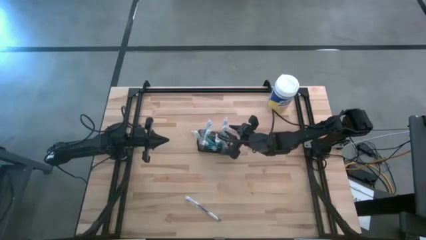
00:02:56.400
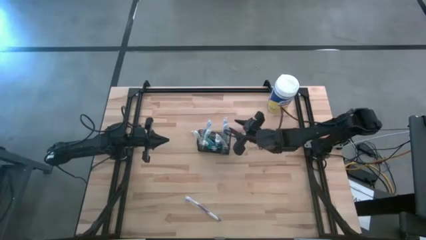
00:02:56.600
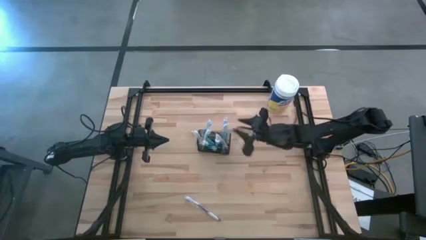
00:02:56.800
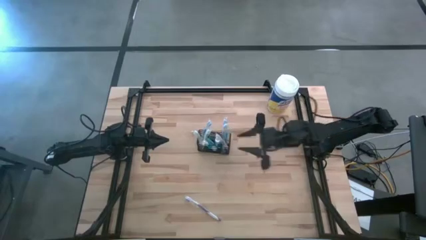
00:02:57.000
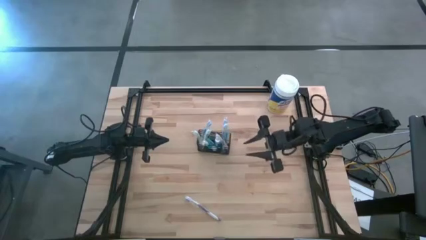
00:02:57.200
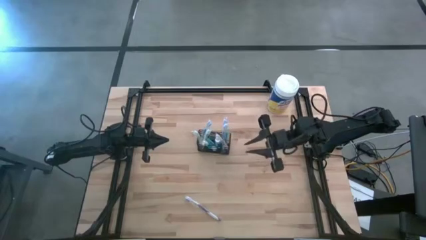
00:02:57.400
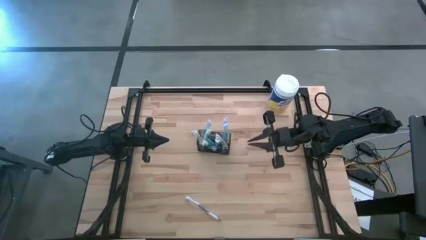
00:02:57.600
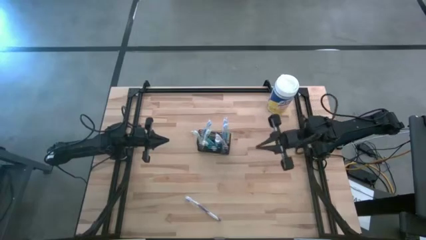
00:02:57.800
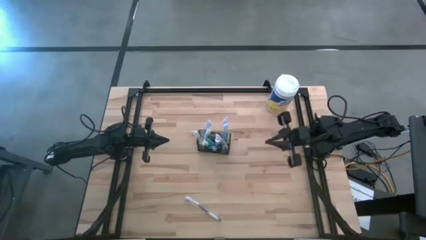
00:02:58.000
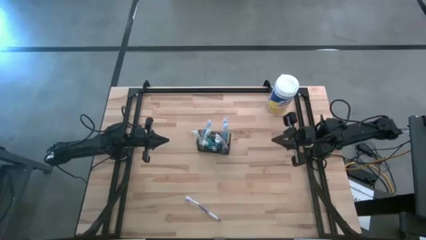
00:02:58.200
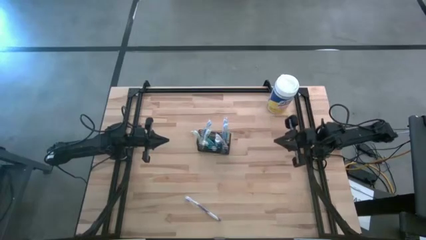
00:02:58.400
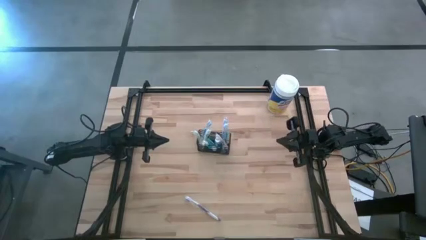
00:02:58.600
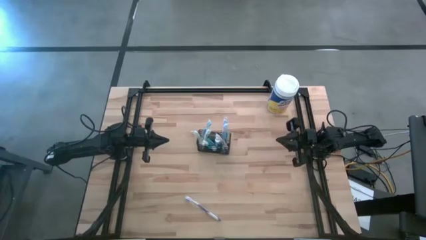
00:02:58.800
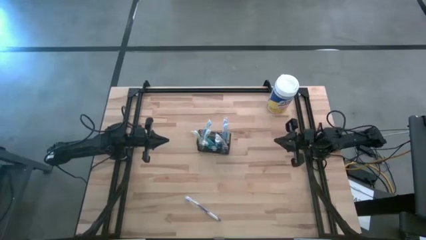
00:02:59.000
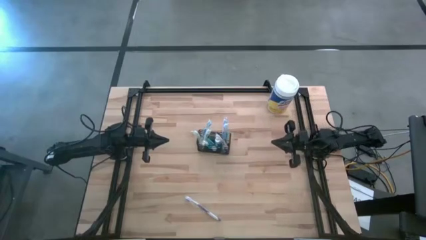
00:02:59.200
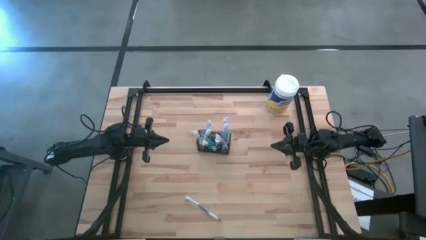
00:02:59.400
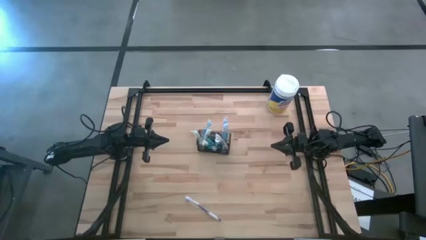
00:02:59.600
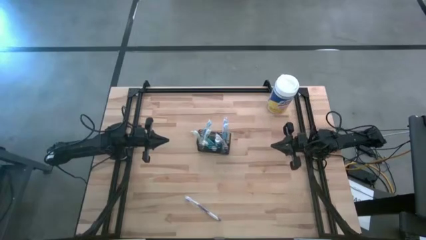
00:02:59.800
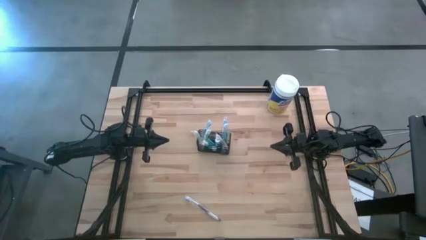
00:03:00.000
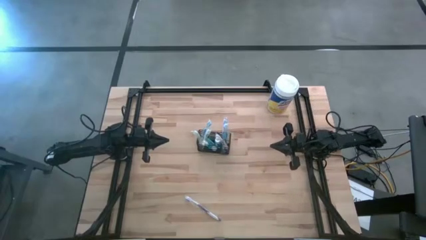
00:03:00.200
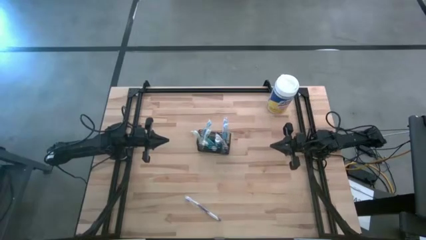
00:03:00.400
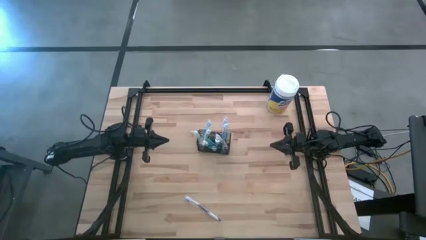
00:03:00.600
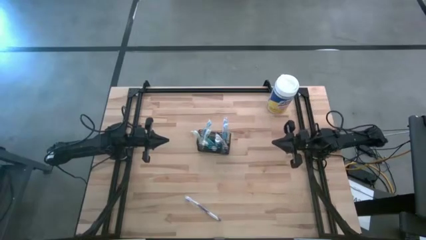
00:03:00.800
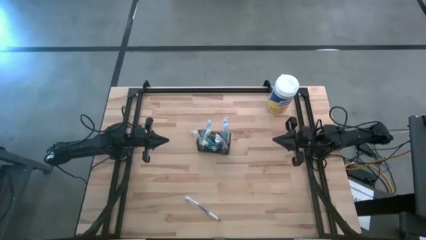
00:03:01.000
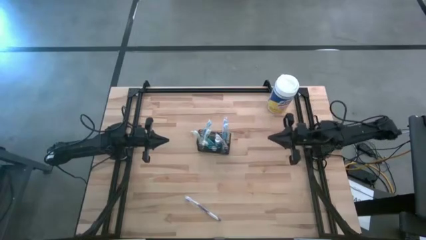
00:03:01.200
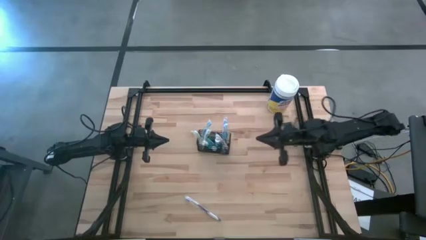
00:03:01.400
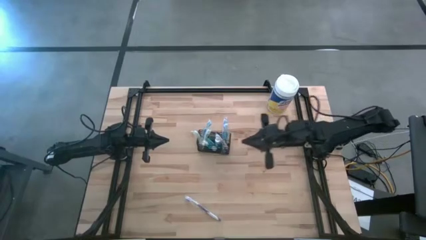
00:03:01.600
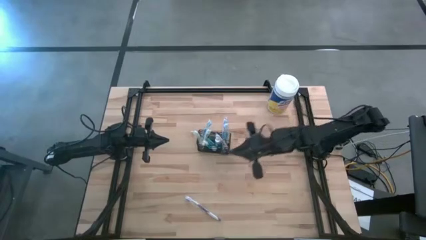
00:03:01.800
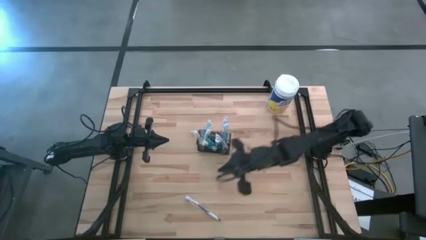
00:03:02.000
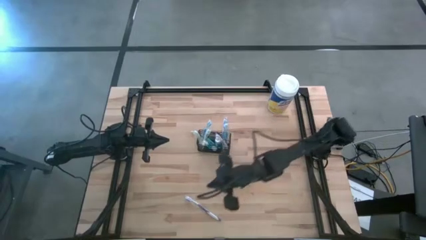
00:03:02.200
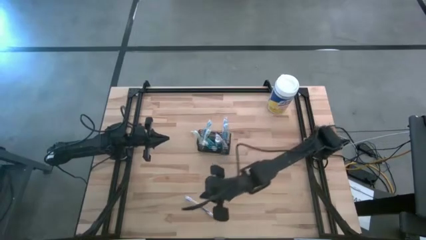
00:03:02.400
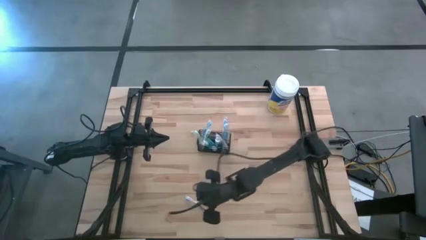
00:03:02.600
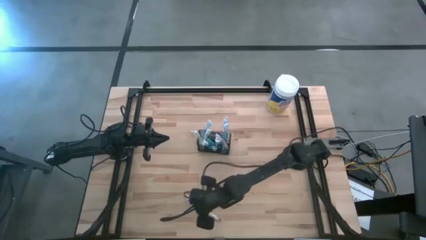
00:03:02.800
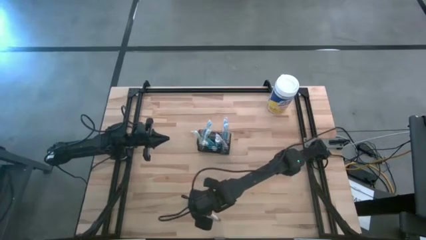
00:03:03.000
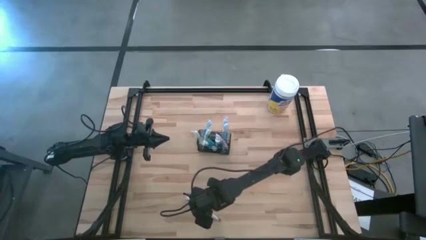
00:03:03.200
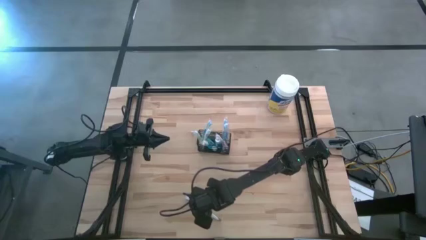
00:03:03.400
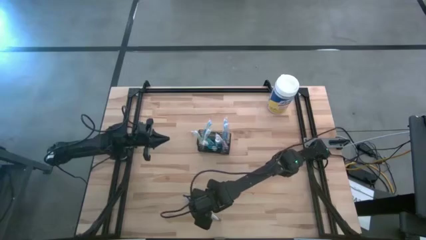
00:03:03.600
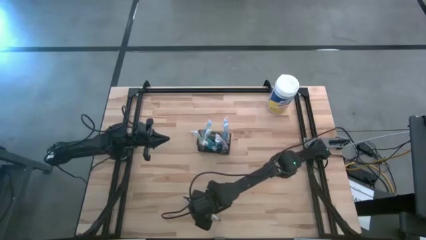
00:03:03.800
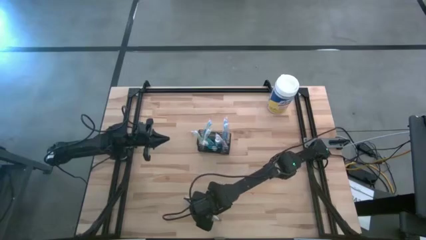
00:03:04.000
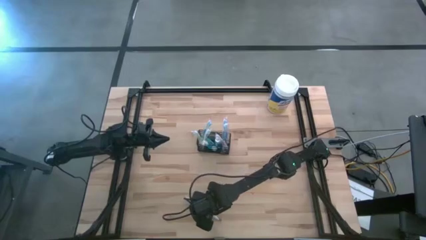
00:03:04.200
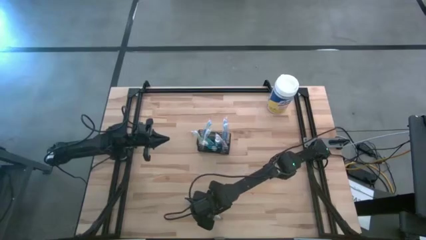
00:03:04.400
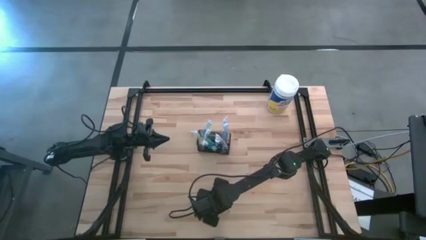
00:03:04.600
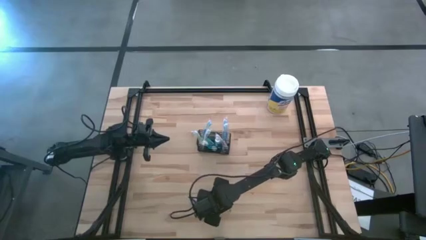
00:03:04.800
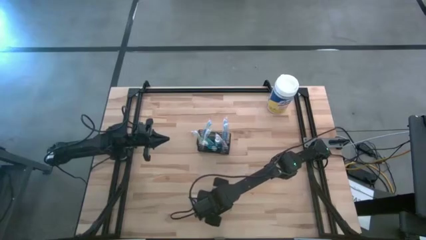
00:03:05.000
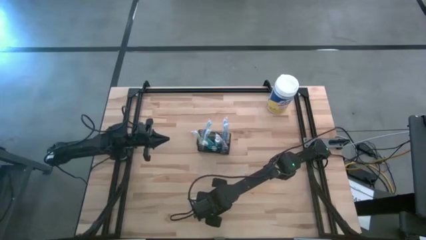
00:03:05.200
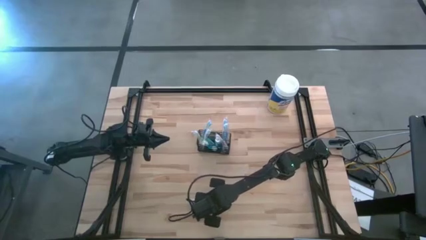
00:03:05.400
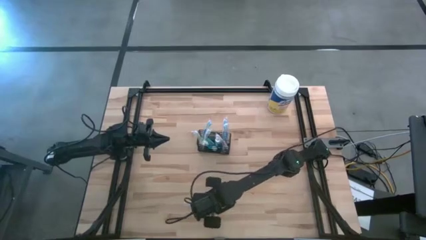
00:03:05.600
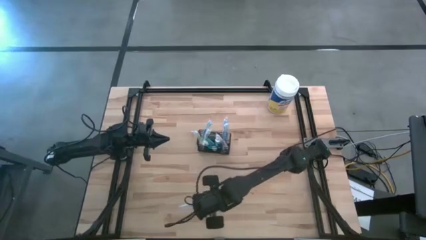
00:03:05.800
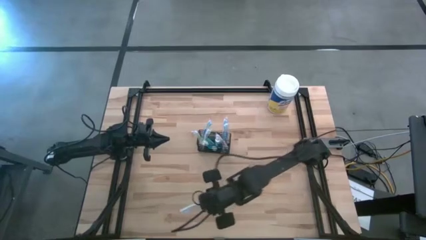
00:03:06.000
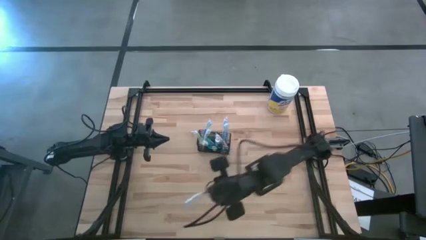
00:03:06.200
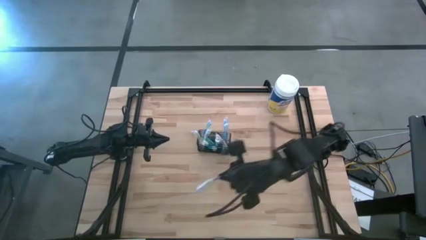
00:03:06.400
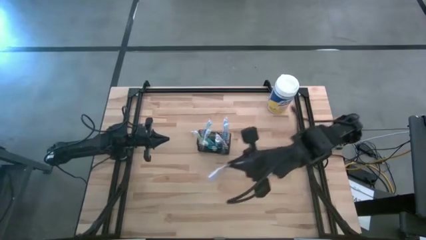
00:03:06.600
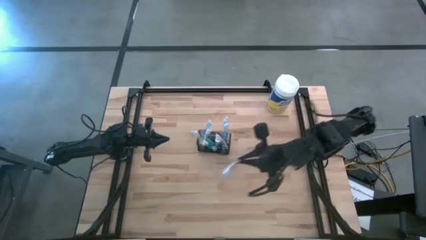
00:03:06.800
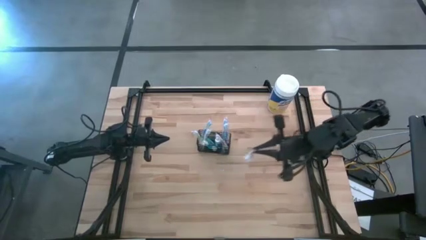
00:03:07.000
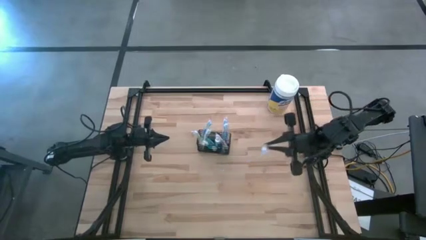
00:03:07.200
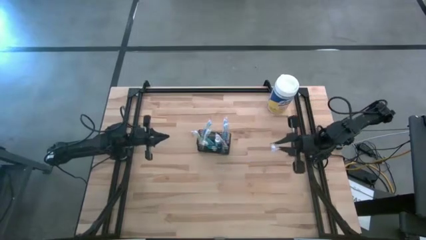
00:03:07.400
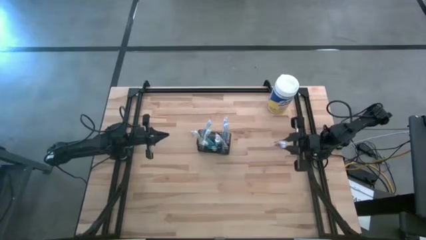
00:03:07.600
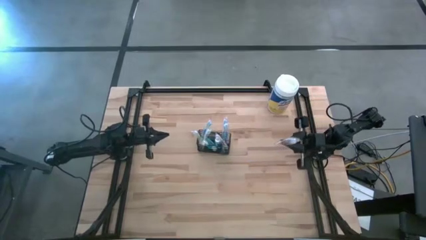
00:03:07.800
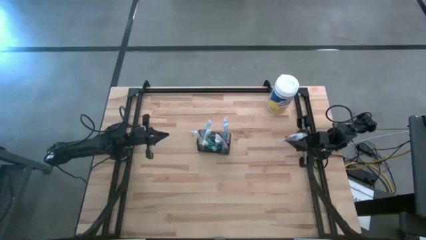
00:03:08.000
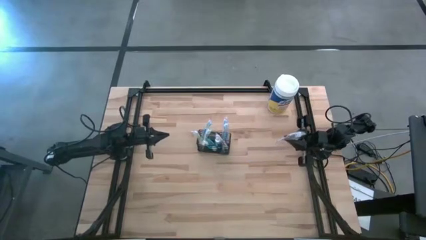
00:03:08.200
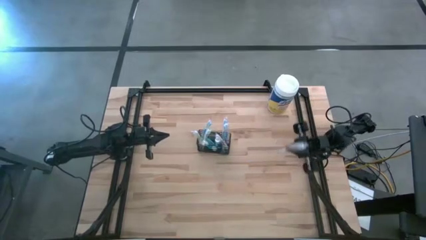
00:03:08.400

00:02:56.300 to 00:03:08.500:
Task: Pick & Place toothbrushing station
Put the purple toothbrush into the black wire organizer

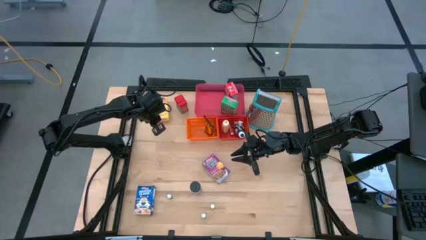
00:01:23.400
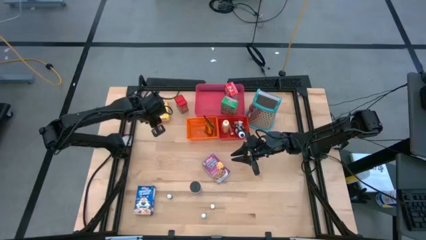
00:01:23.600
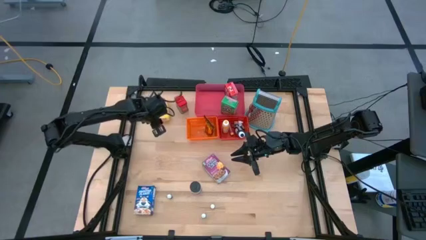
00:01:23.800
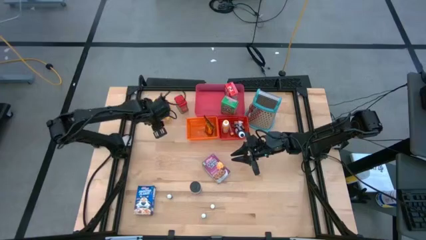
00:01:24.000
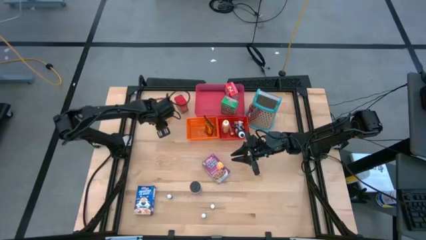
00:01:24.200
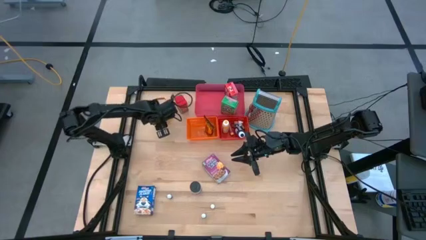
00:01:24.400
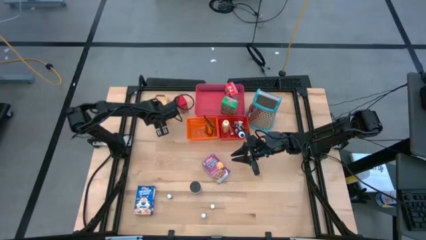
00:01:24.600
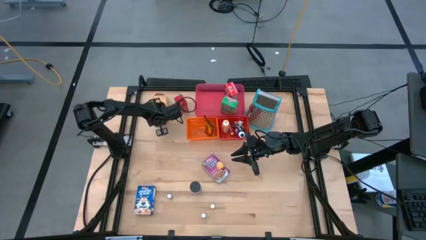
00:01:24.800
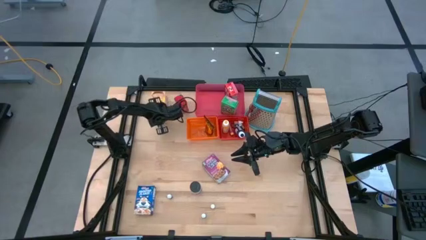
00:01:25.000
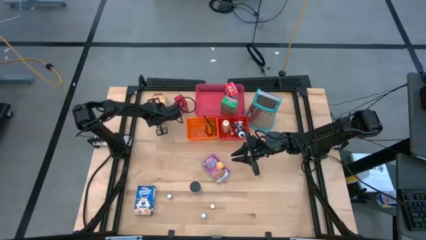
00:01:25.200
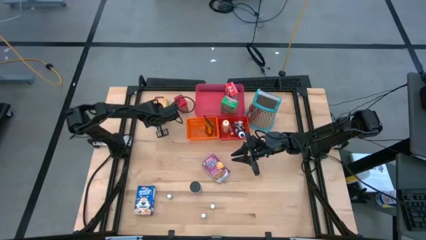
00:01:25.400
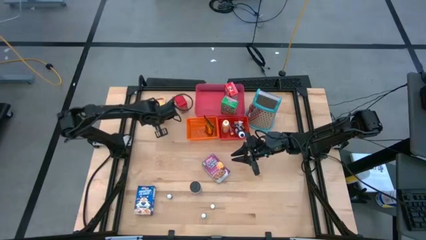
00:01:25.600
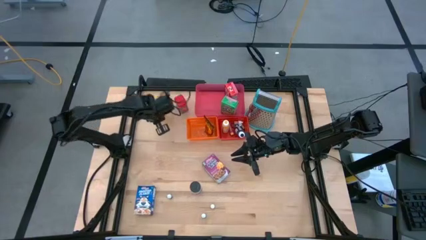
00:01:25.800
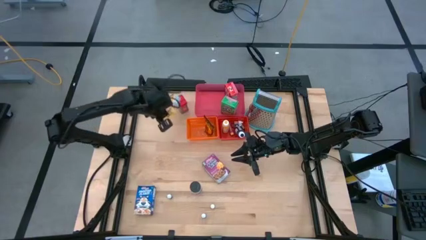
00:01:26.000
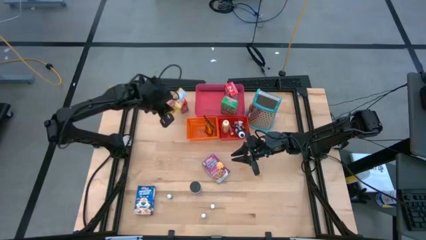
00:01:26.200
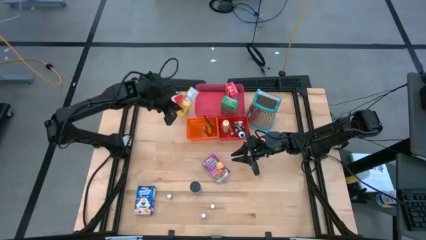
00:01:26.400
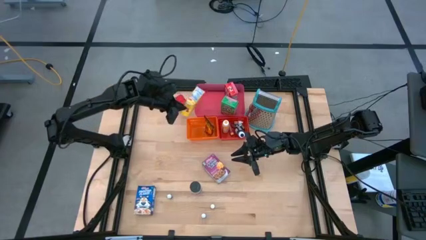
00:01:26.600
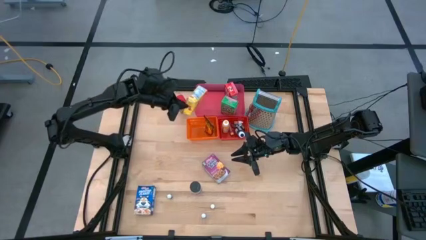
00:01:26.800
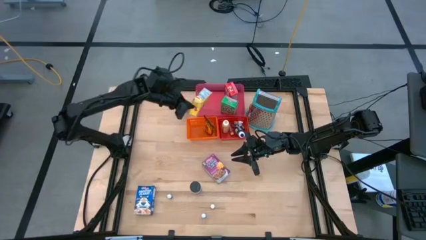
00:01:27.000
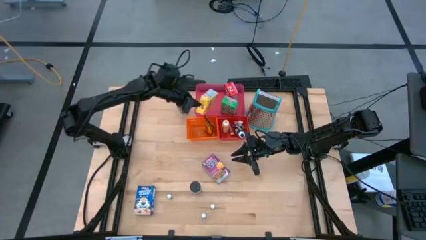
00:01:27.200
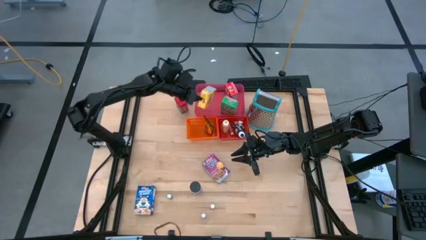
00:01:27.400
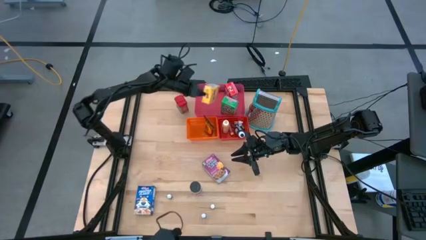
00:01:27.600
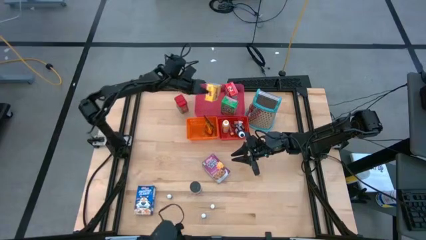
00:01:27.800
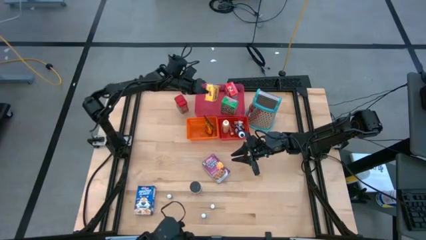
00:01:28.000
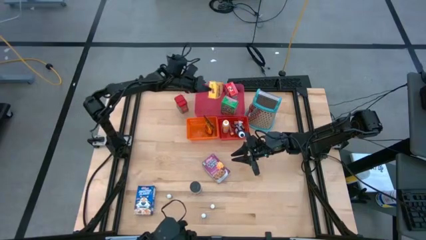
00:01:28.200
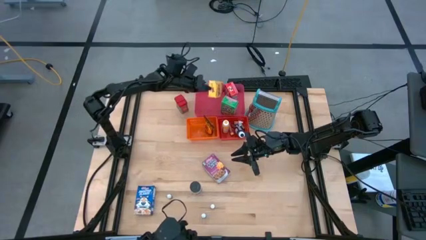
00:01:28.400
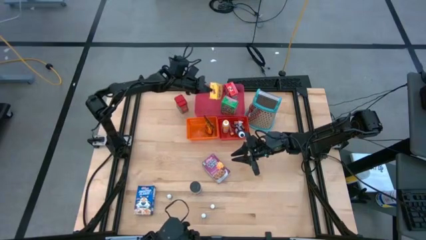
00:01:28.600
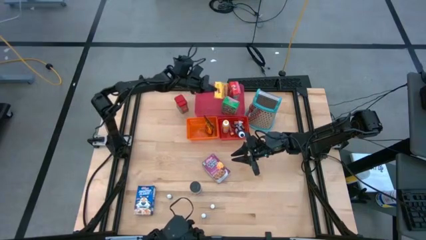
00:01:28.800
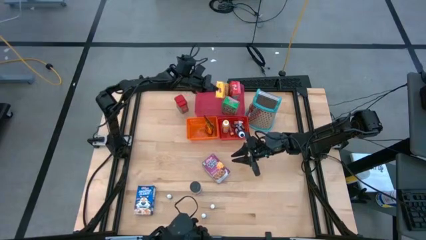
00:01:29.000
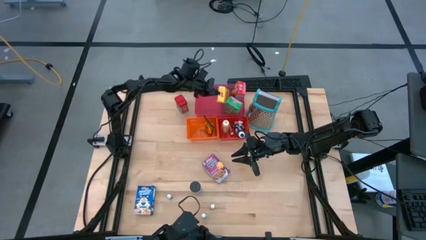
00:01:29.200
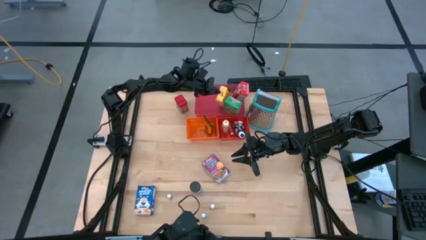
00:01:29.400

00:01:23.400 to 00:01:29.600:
Task: Pick & Place Kitchen Items
Put the yellow cereal box into the pink bin
